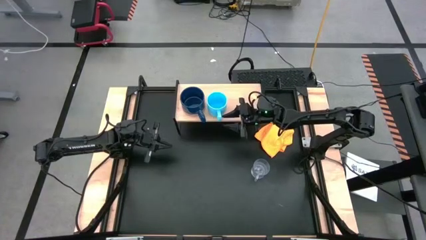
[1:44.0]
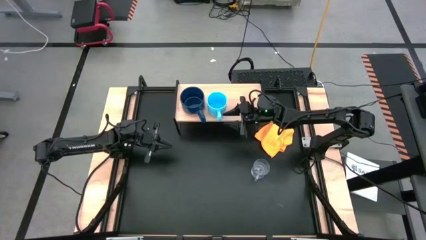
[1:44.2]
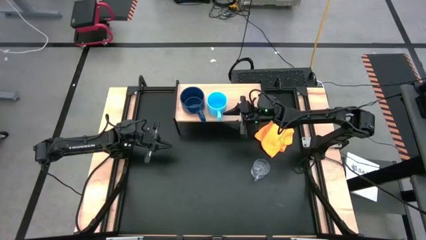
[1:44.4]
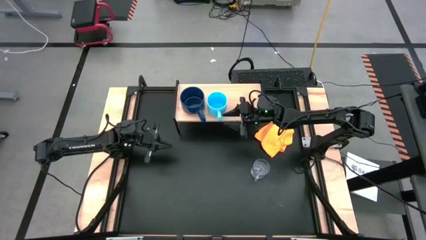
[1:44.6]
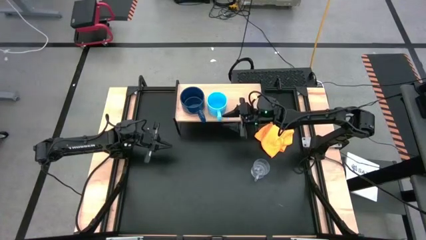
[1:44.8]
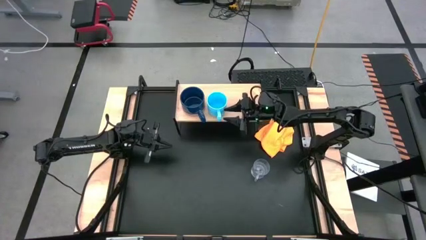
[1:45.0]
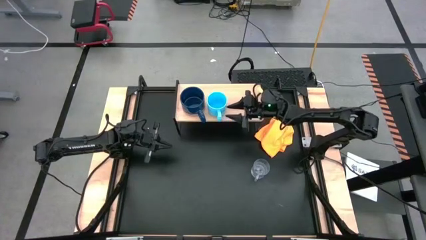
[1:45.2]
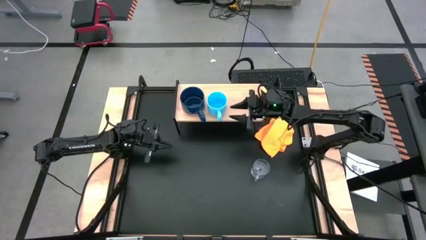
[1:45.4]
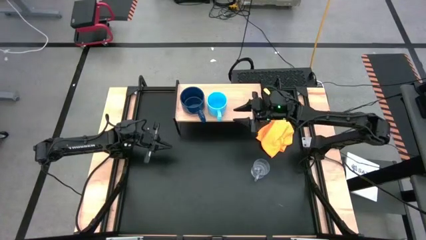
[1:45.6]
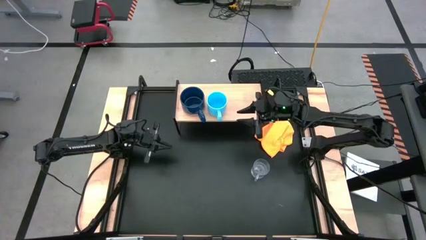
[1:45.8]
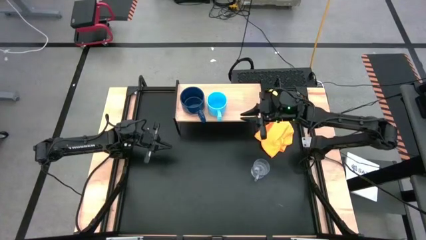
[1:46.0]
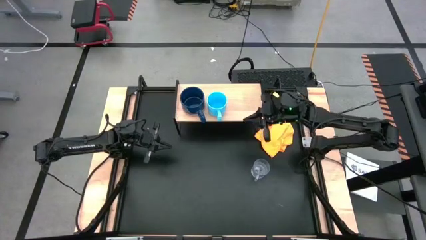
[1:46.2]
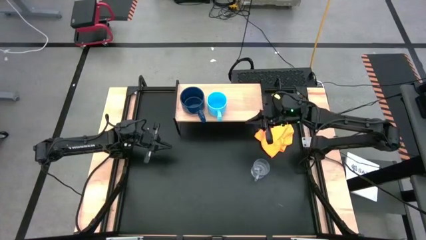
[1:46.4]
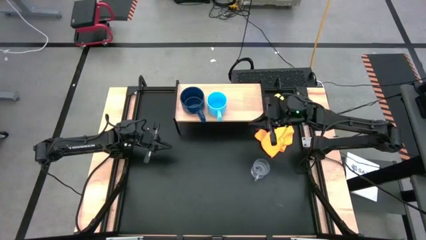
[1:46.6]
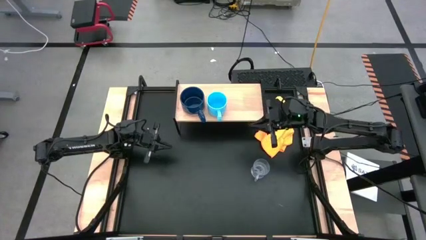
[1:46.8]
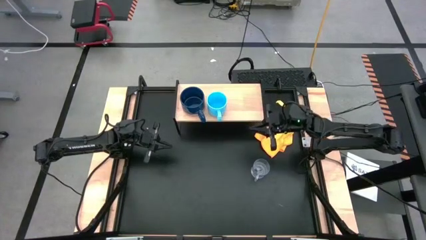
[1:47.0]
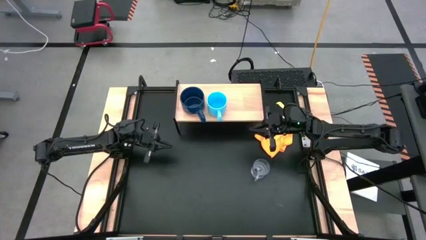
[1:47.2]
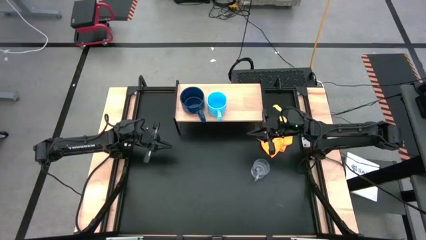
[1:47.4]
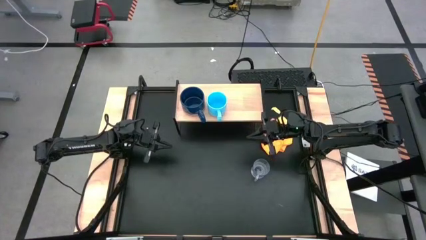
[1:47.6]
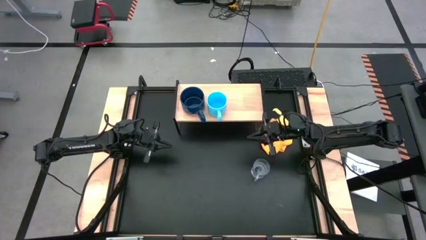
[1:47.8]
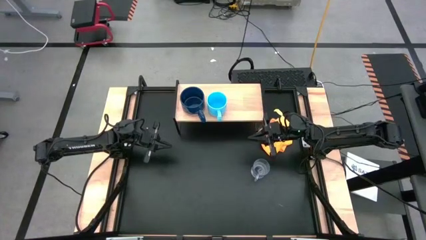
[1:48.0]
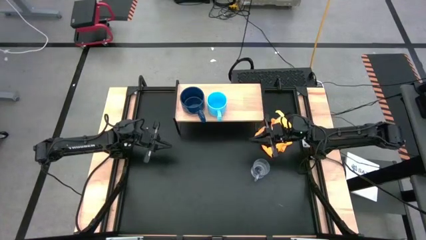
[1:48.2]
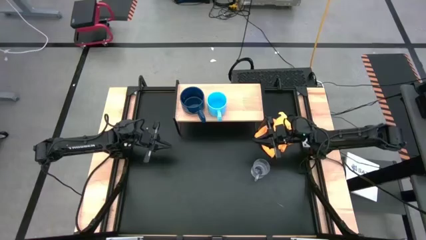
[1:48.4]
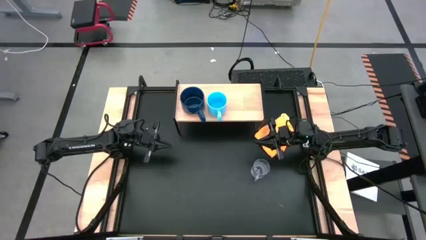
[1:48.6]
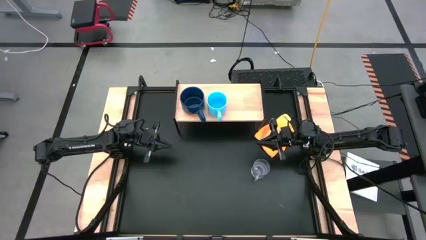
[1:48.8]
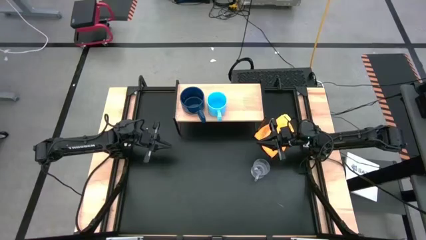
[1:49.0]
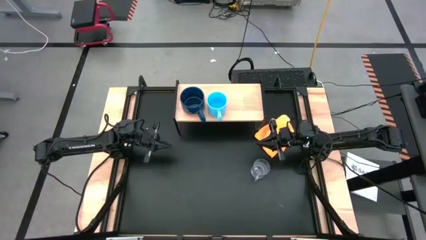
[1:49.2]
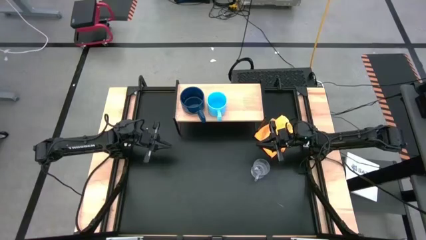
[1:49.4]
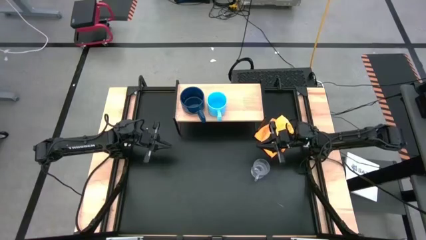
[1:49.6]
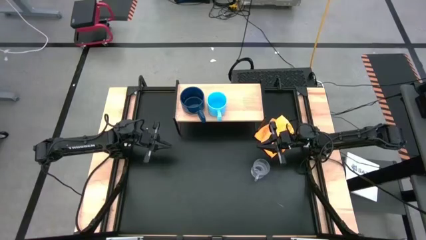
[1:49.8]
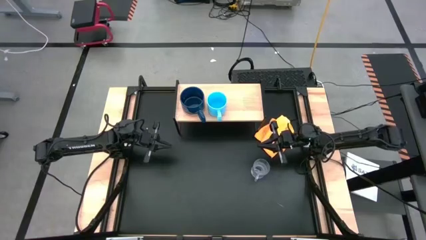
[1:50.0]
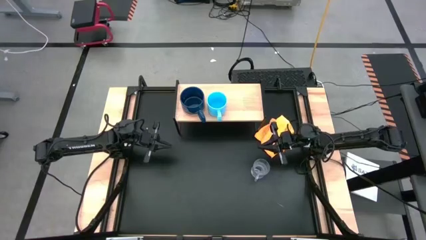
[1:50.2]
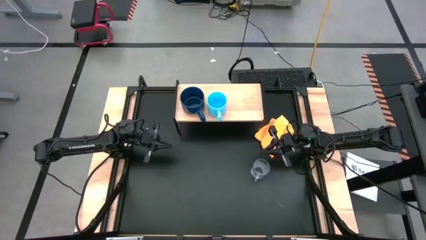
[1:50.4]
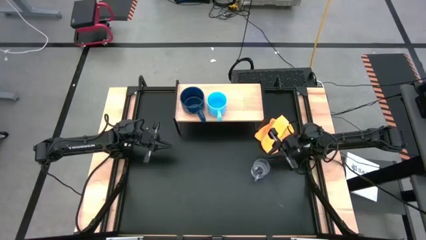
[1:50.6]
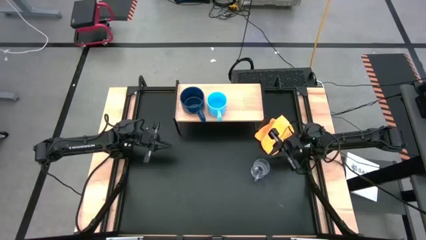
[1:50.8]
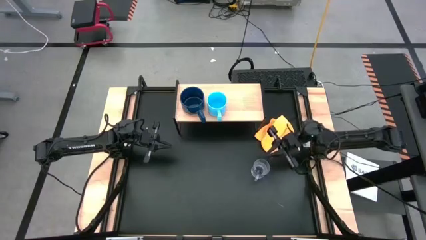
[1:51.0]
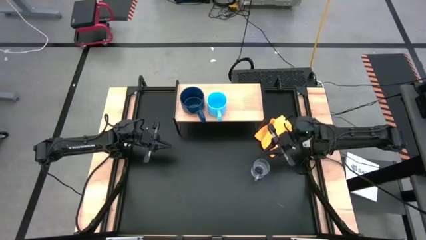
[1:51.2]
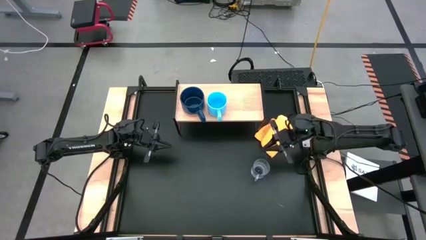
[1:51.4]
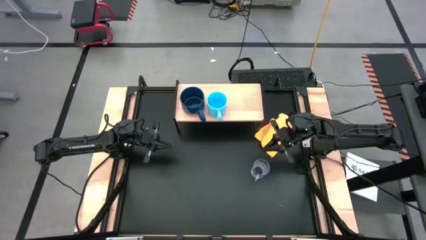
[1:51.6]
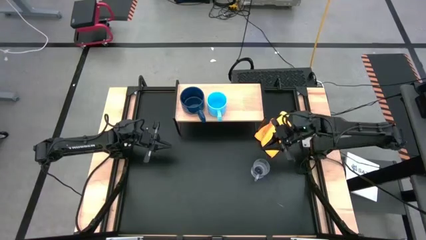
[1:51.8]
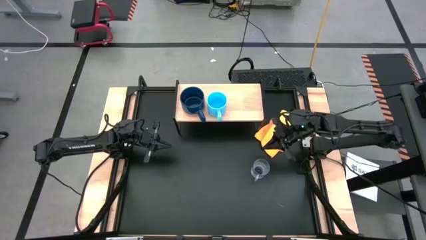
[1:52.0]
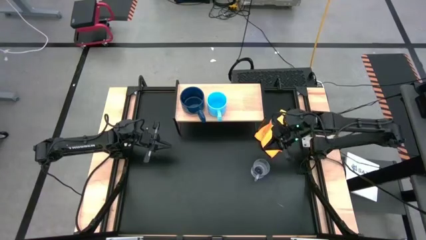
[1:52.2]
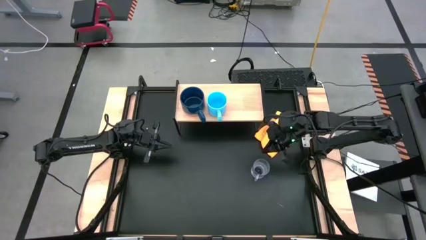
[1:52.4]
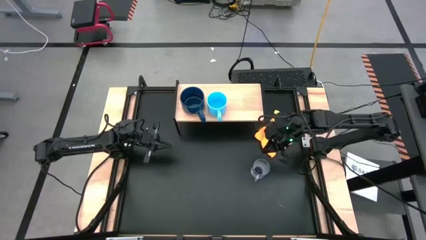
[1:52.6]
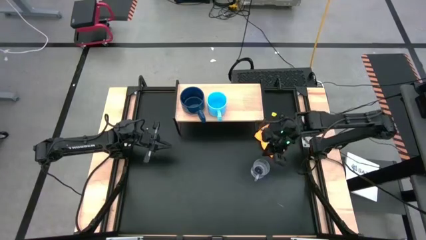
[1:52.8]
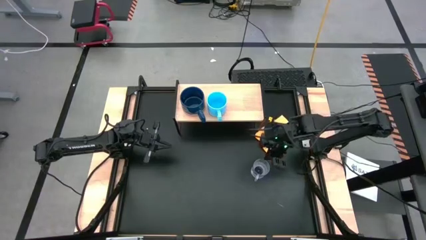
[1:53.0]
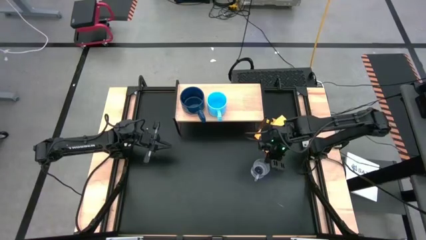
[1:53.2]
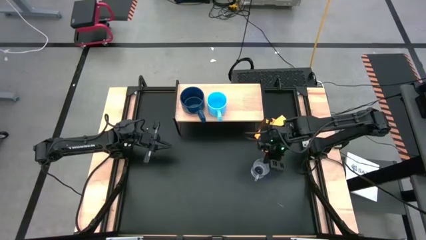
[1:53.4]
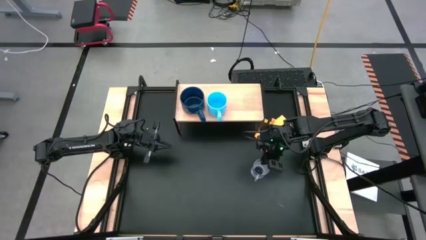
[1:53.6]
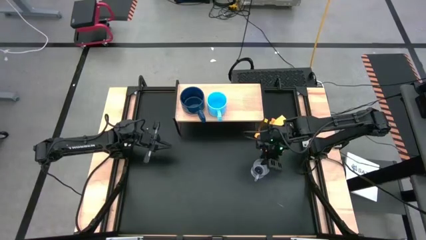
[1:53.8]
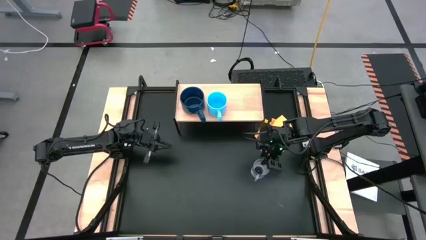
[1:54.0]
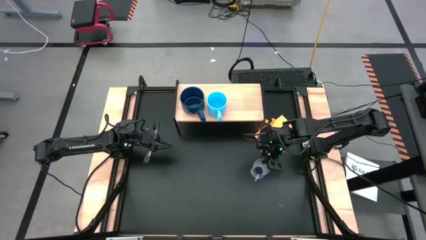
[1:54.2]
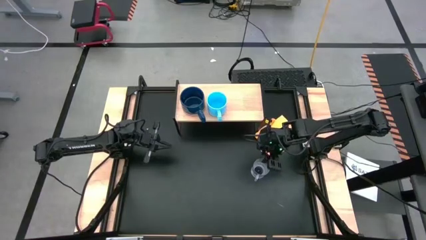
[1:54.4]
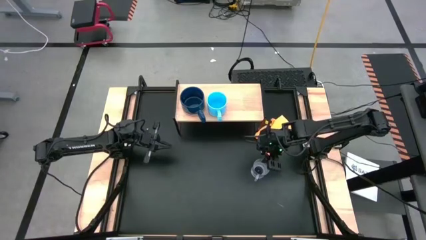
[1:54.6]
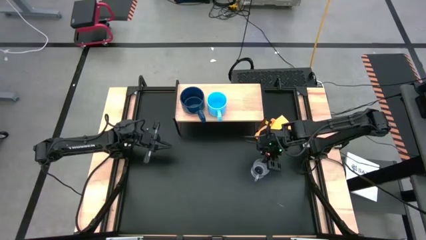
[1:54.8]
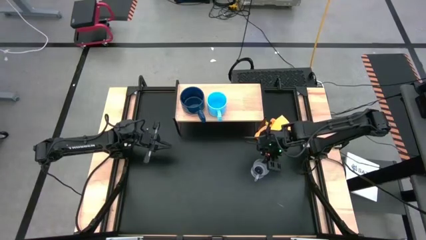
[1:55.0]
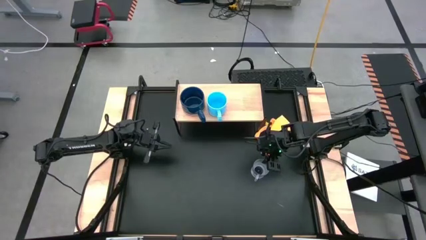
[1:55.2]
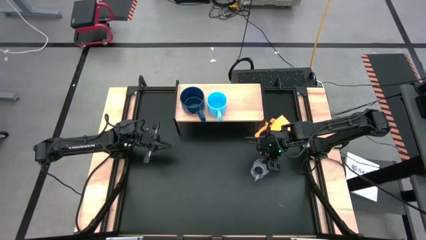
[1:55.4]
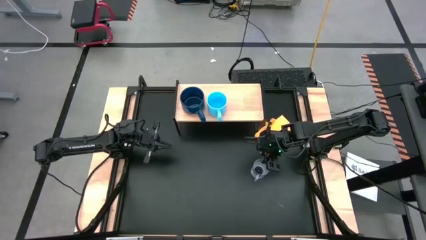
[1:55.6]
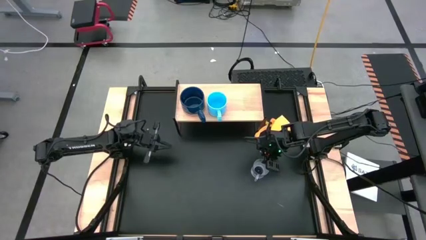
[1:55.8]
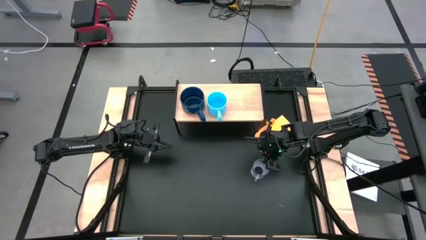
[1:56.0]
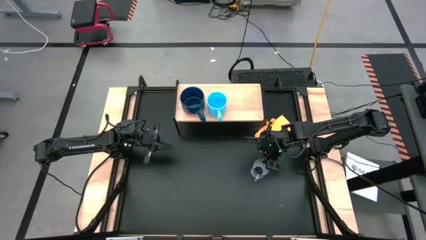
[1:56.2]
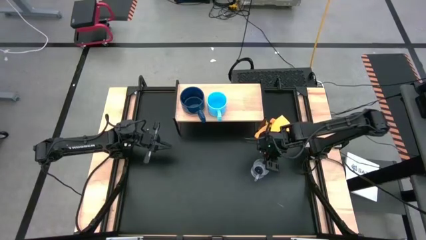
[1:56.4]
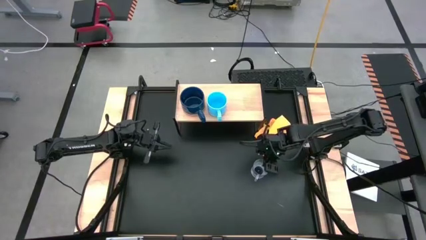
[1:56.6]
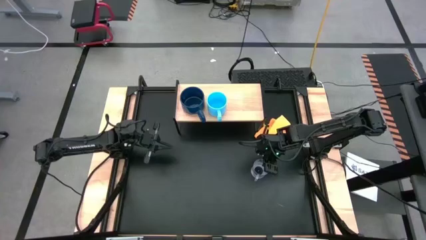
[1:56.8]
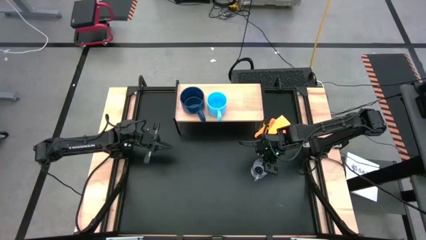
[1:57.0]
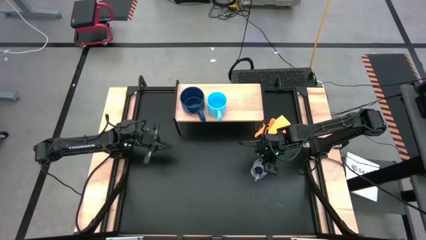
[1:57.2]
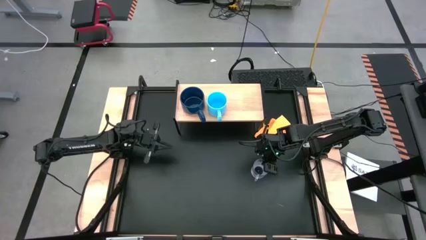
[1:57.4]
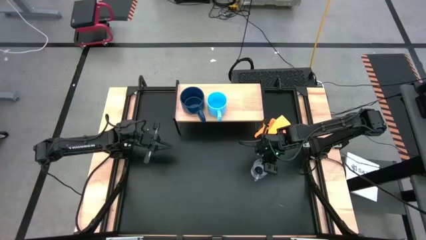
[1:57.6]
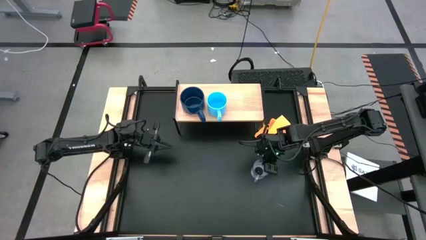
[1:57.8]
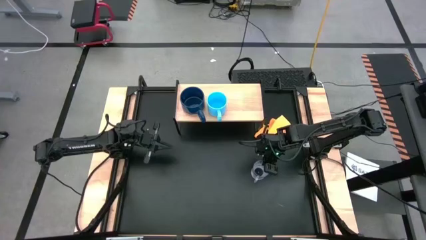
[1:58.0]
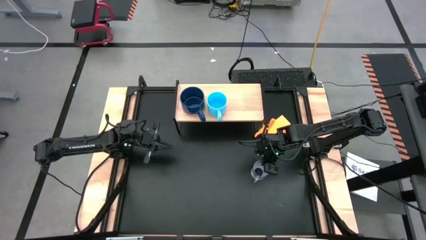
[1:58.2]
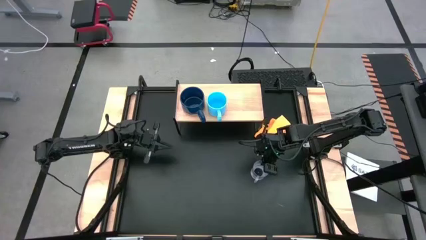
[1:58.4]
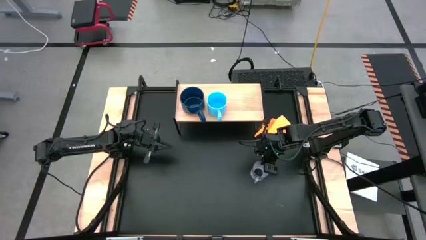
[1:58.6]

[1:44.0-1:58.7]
Task: Stack small to large cups/mugs on shelf
Put the transparent mug on the shelf
